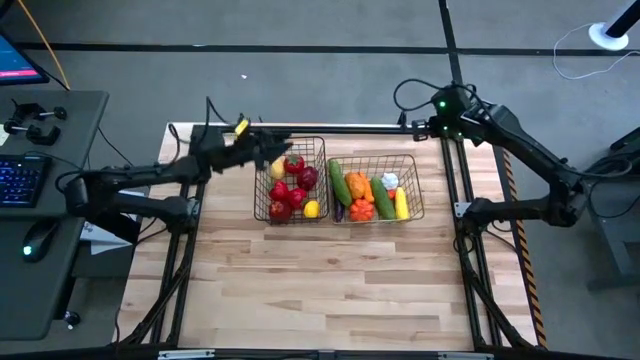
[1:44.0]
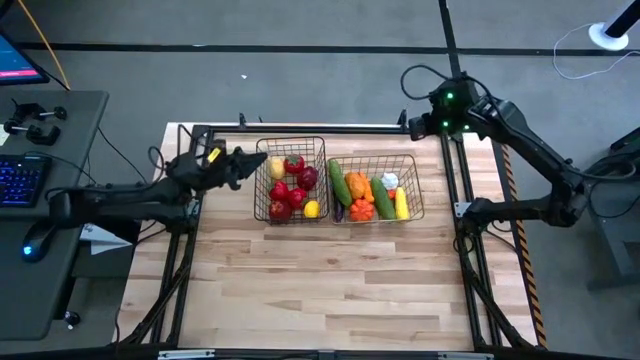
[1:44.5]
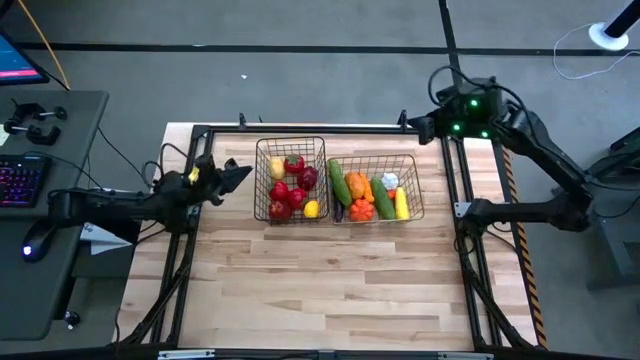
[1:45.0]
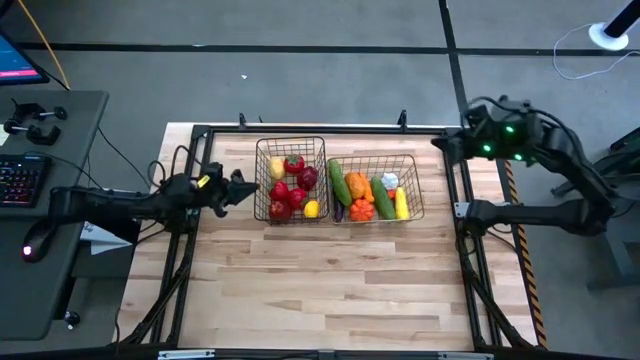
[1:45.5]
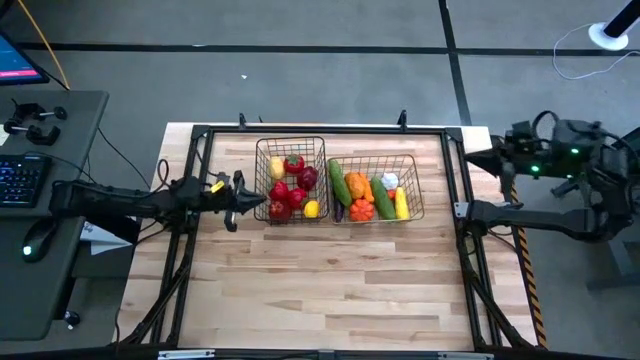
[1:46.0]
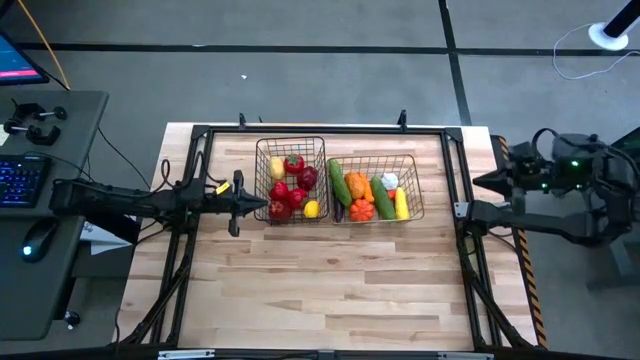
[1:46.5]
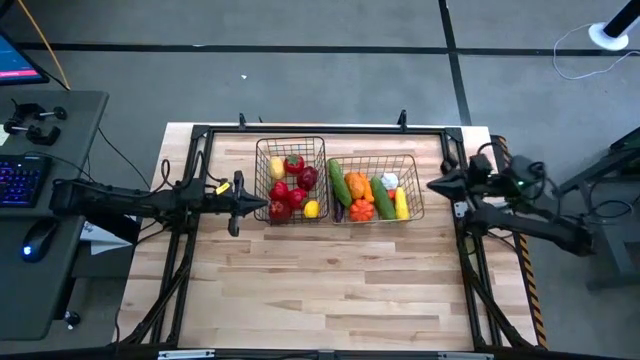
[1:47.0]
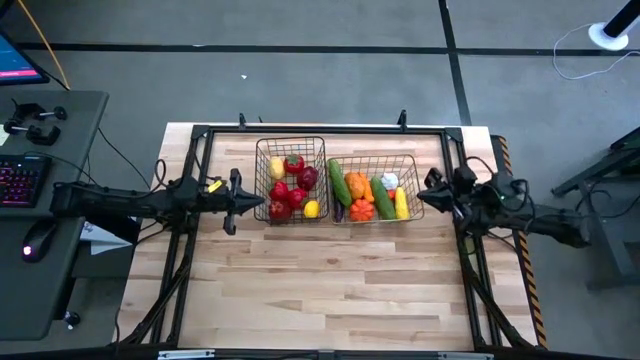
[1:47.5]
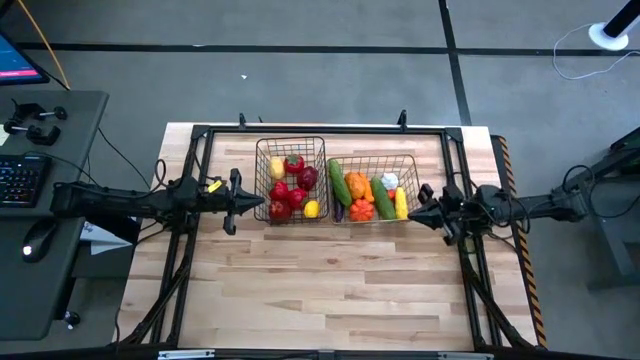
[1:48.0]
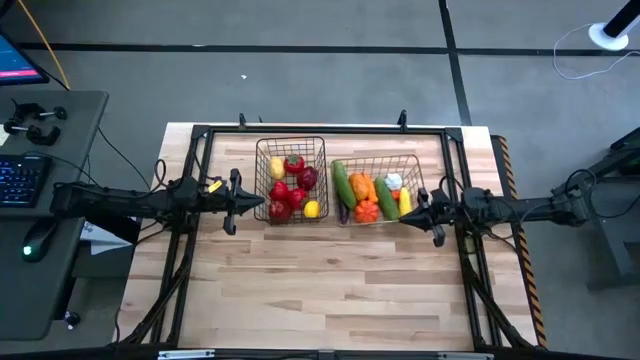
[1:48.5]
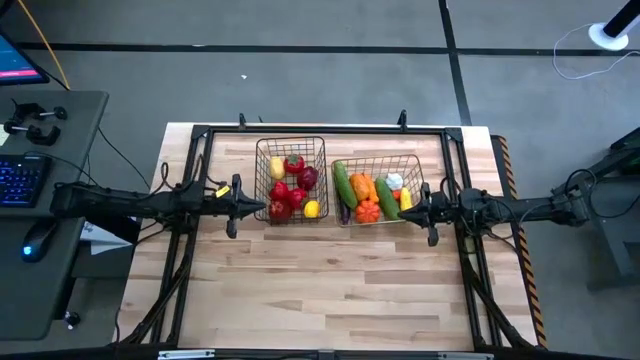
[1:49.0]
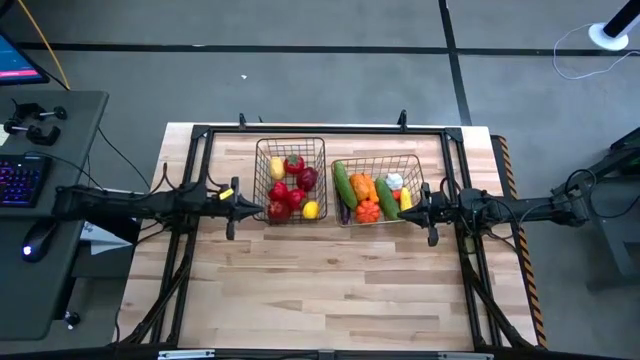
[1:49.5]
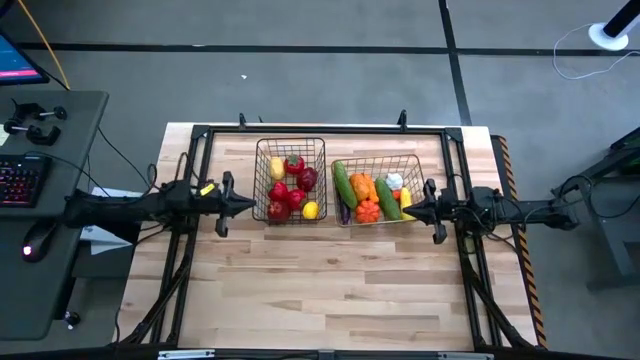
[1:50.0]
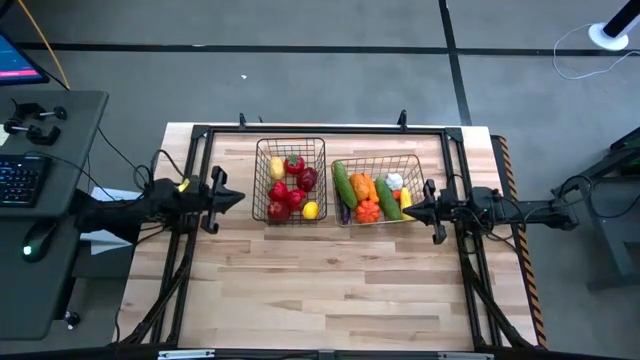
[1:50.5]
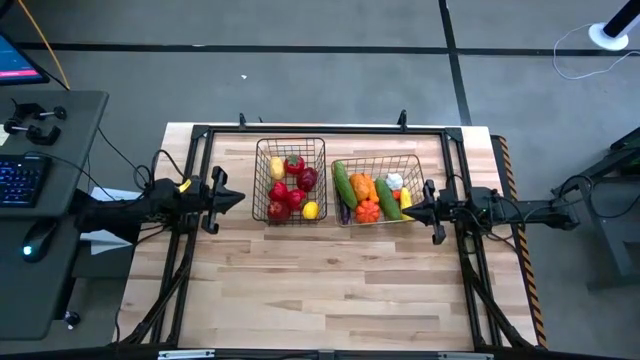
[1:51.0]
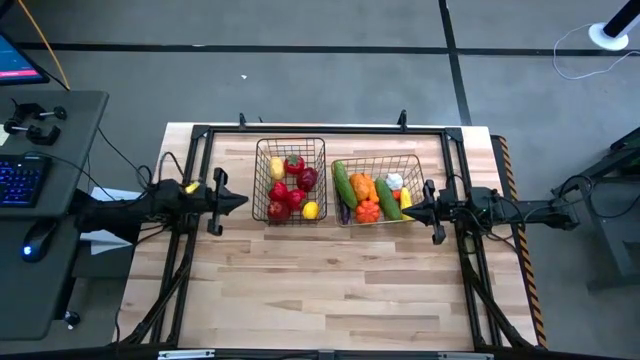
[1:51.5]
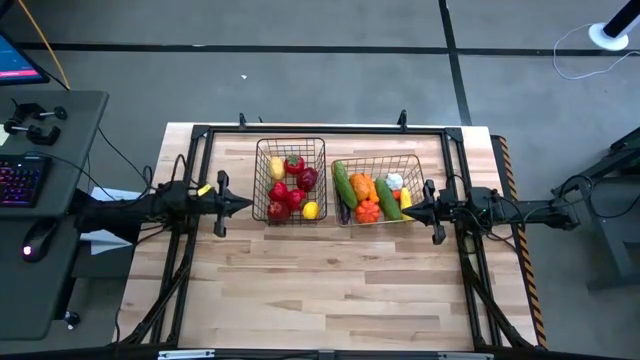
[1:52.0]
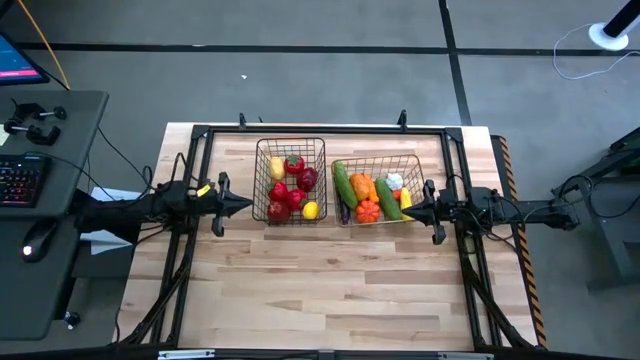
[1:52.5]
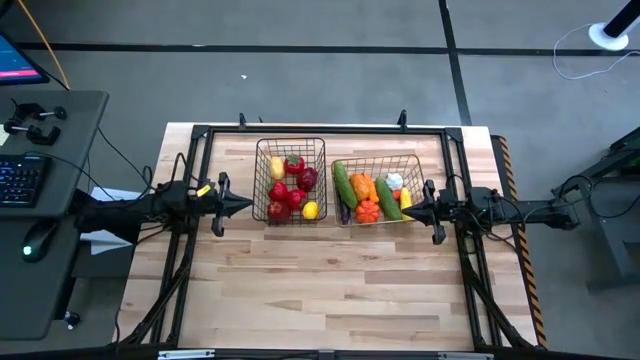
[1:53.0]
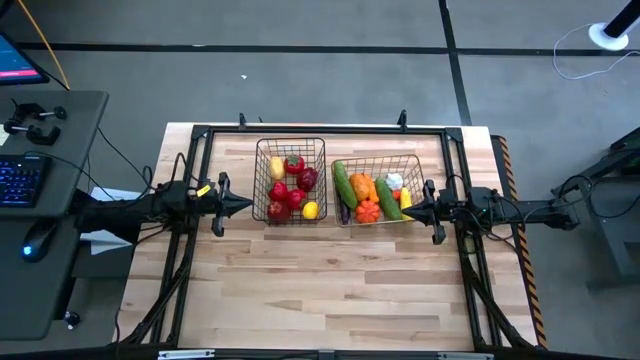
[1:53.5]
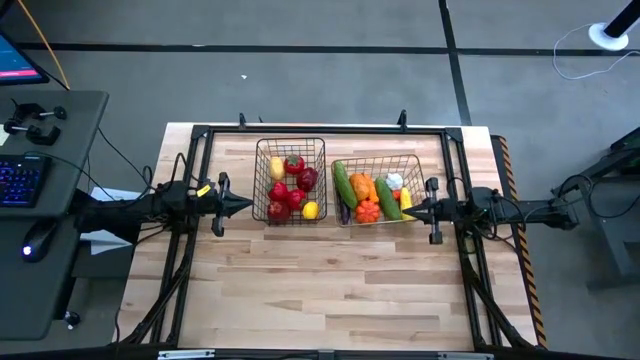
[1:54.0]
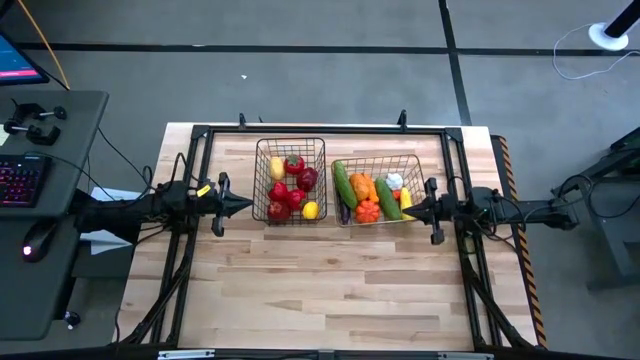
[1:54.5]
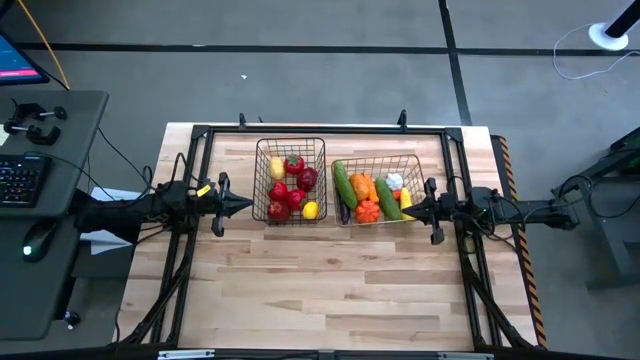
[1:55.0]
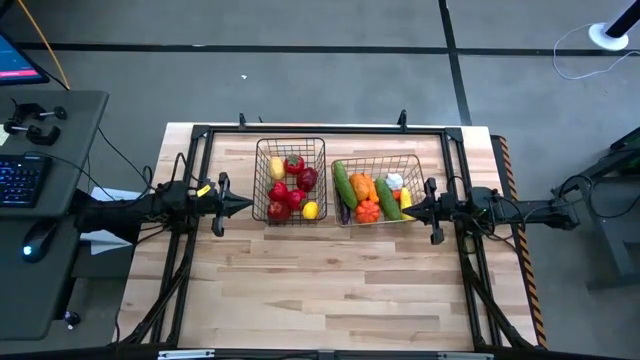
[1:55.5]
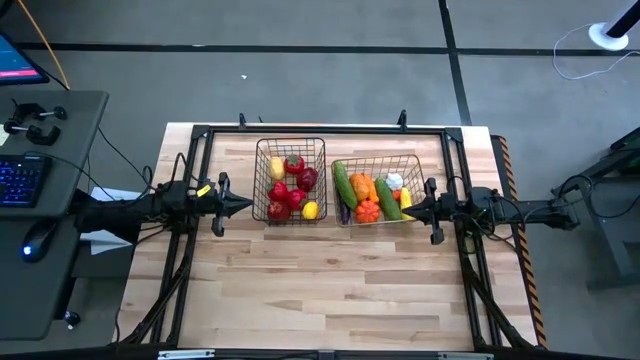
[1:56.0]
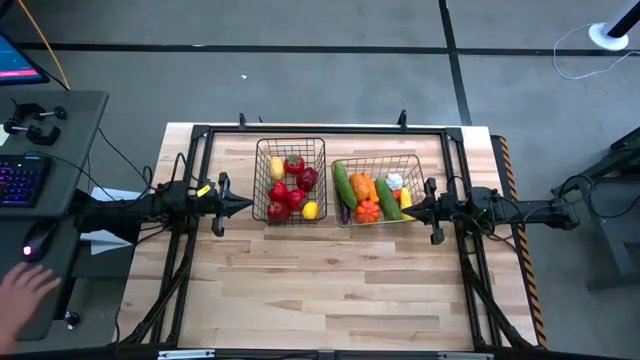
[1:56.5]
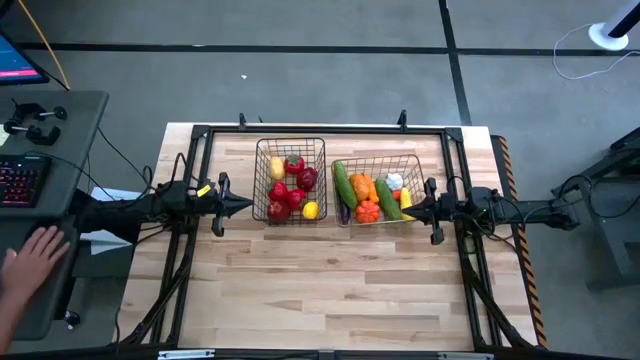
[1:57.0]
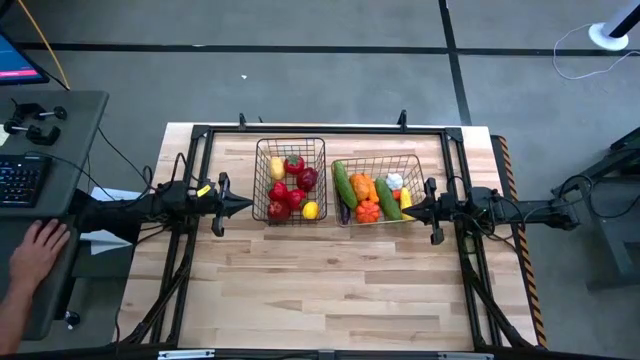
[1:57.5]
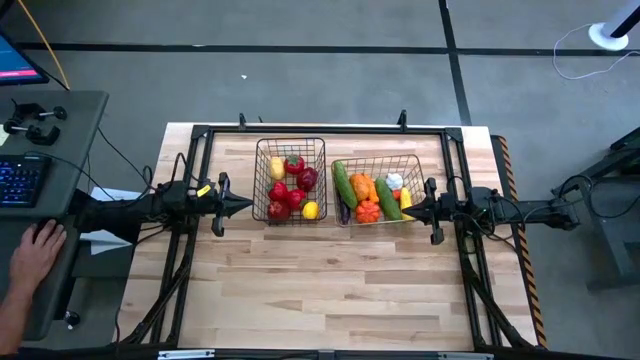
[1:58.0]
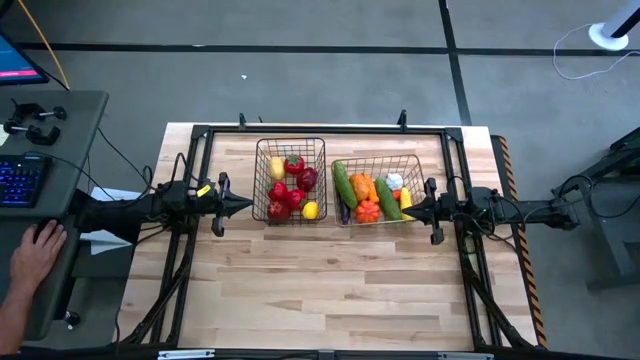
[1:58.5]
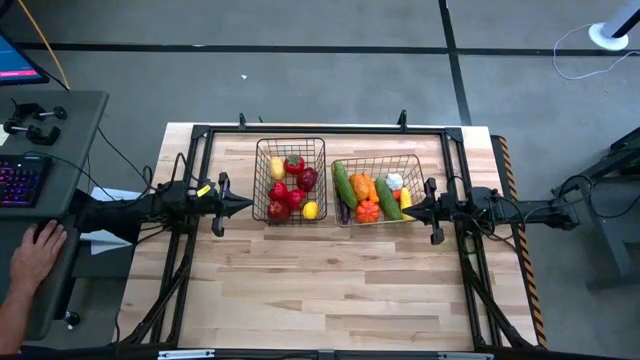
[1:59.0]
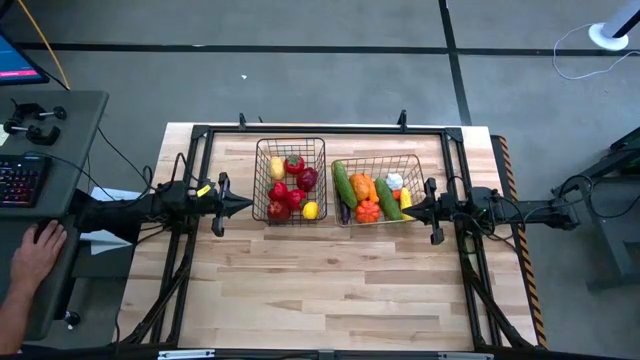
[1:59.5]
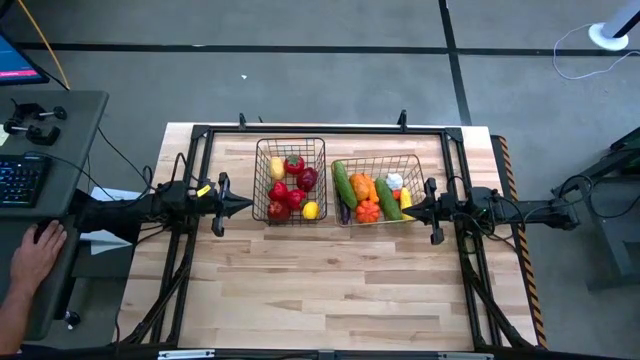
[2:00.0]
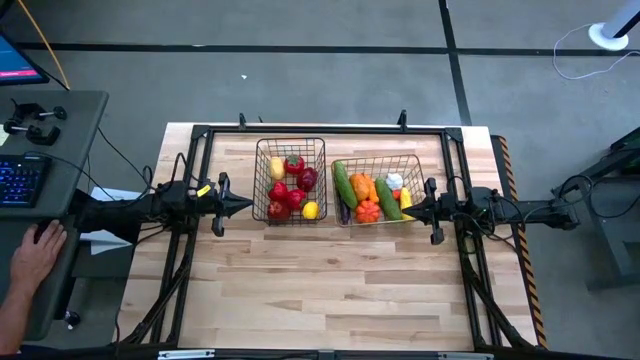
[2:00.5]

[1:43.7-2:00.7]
Task: Sort produce into baskets
Return to Home Position

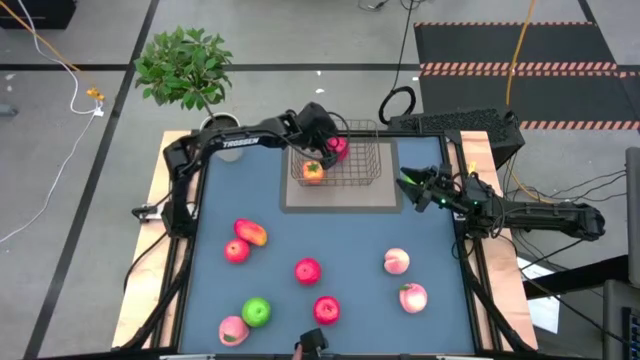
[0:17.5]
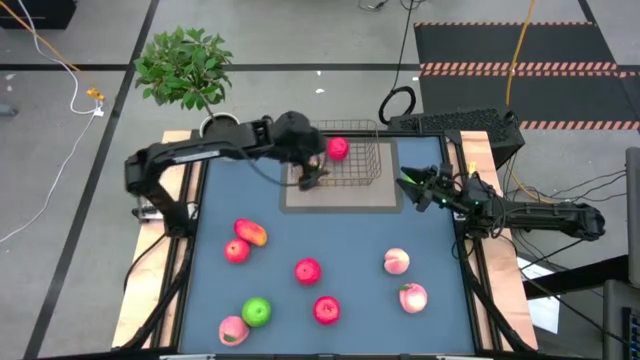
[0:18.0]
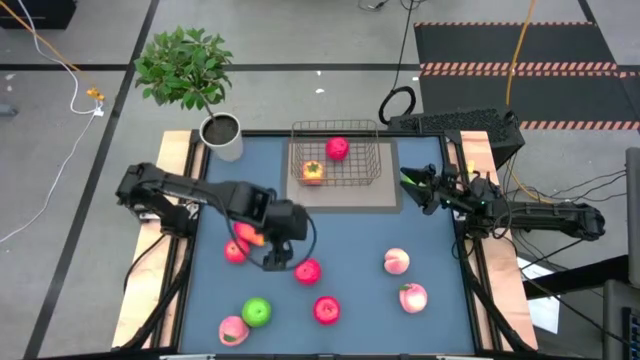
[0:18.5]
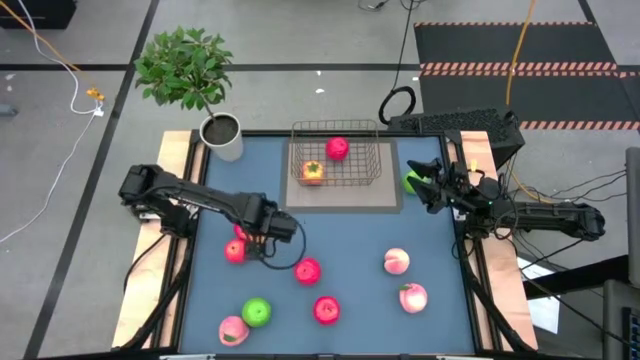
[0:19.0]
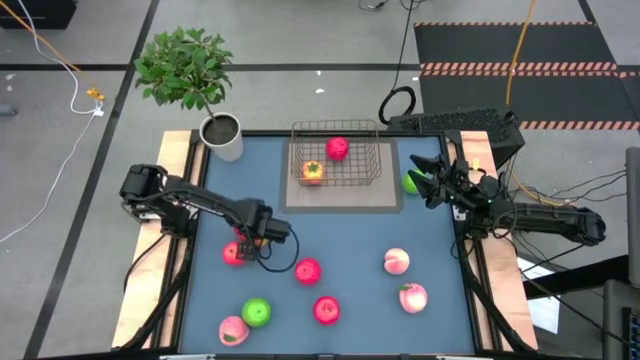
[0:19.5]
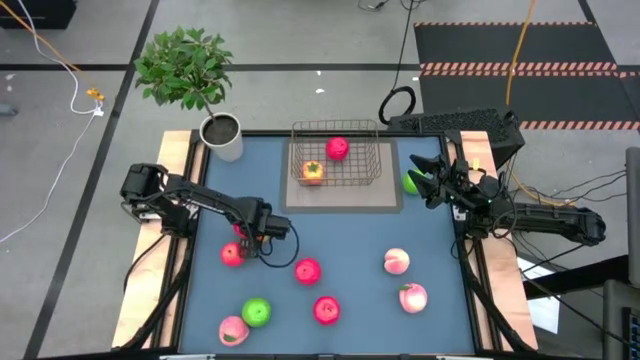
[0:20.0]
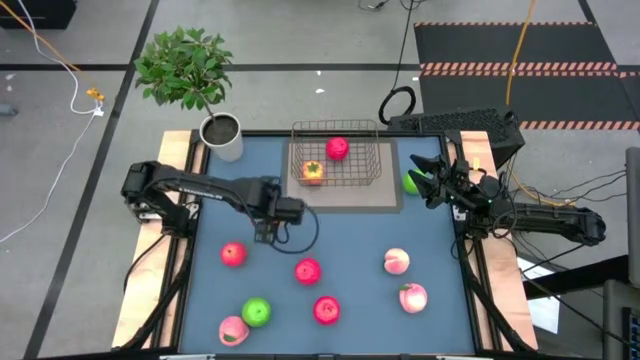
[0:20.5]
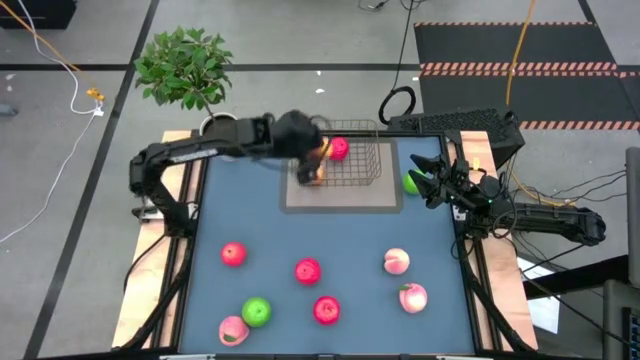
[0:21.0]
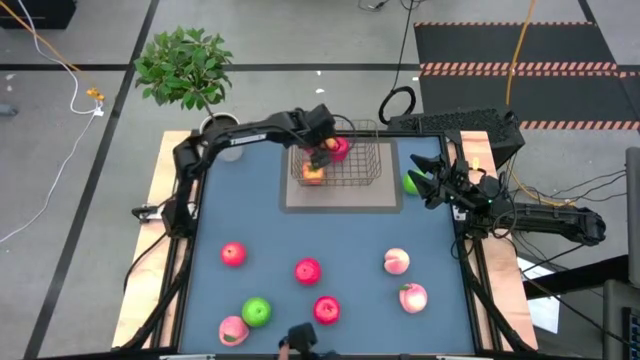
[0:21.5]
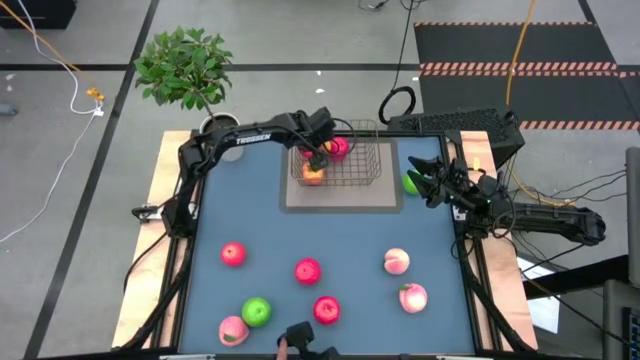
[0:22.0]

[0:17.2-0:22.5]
Task: Build produce basket
Put the orange mango into the wire basket
